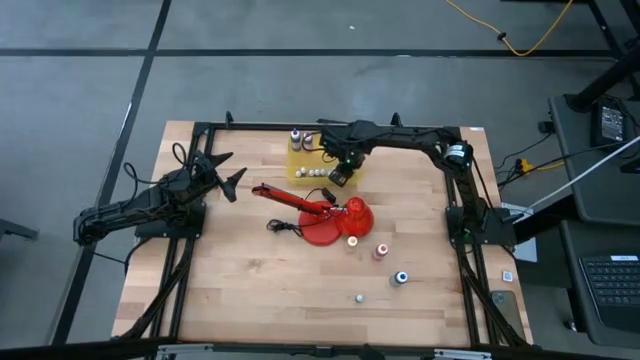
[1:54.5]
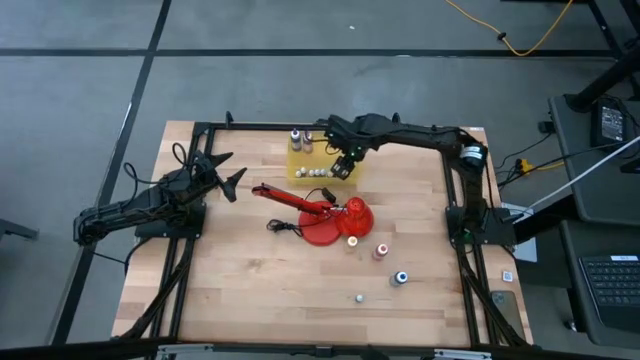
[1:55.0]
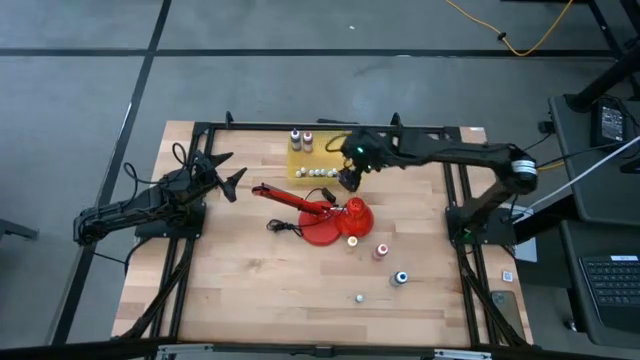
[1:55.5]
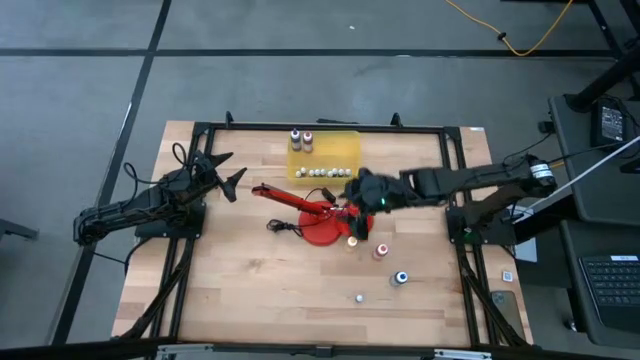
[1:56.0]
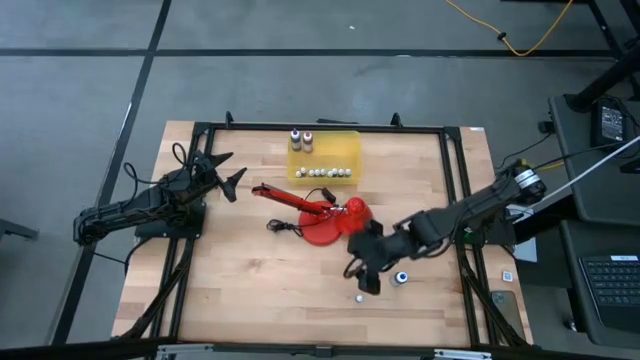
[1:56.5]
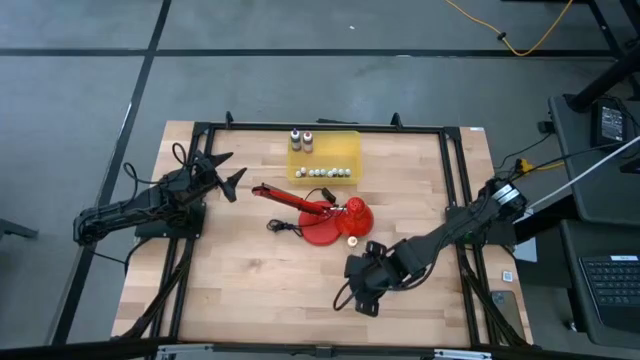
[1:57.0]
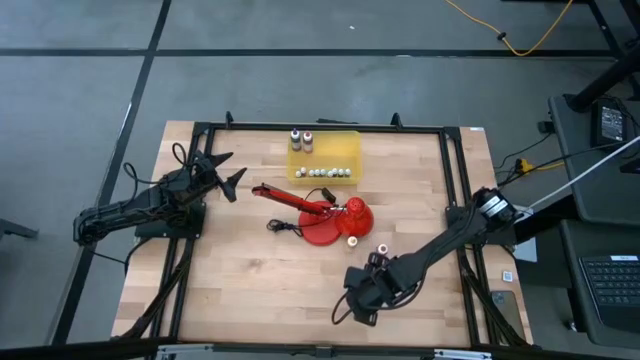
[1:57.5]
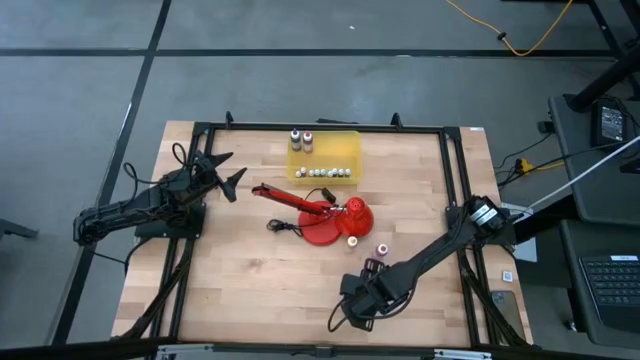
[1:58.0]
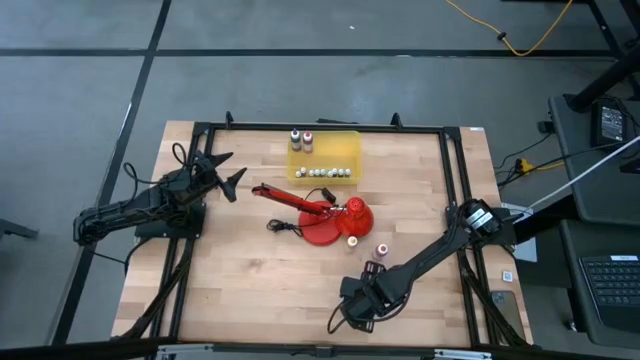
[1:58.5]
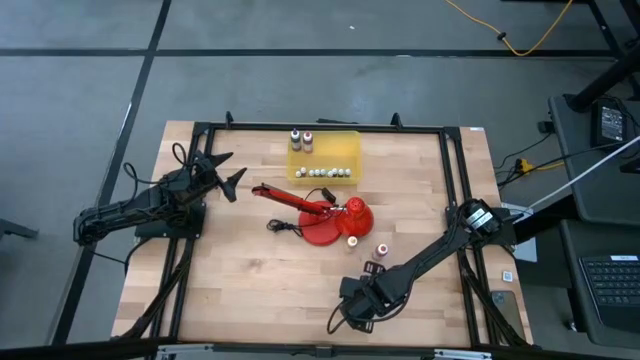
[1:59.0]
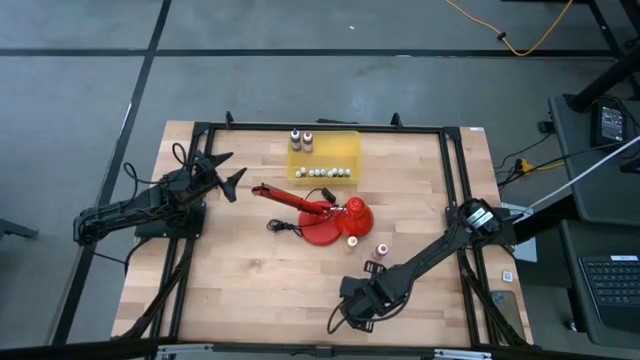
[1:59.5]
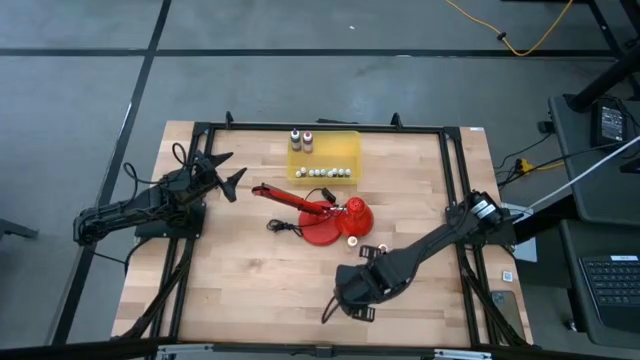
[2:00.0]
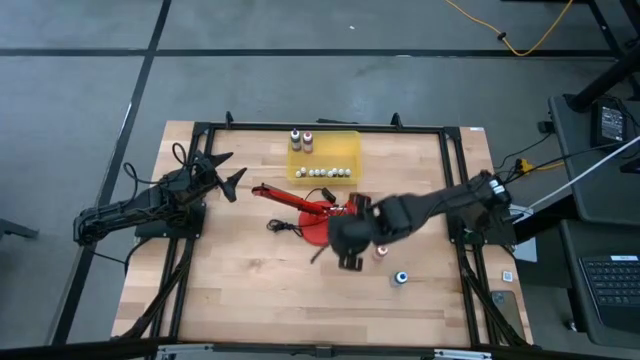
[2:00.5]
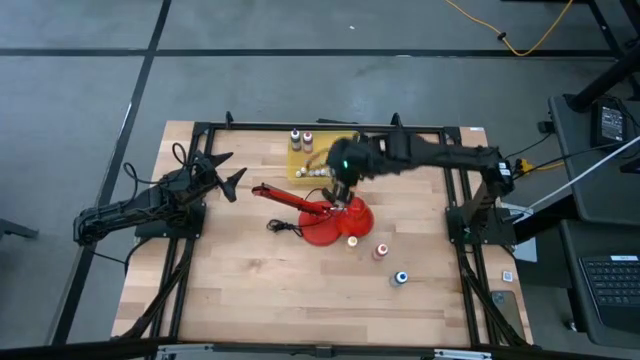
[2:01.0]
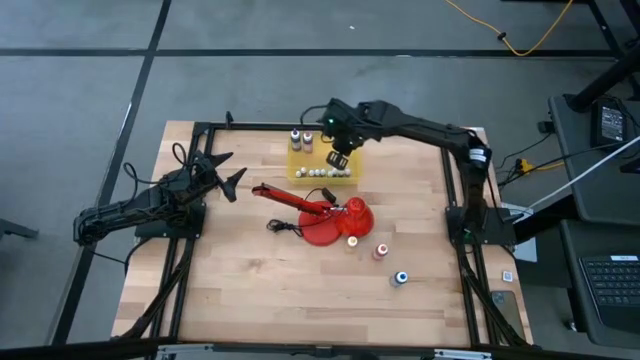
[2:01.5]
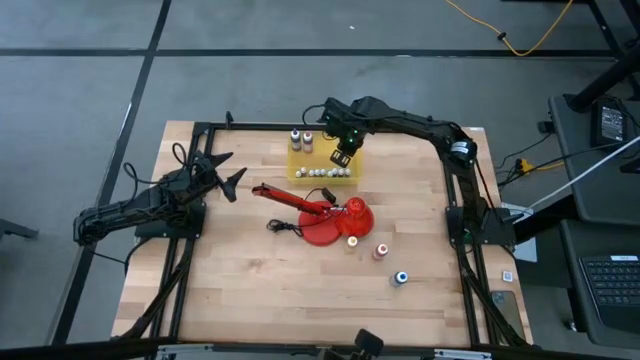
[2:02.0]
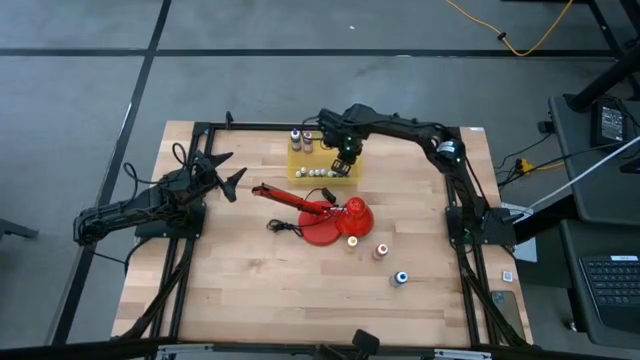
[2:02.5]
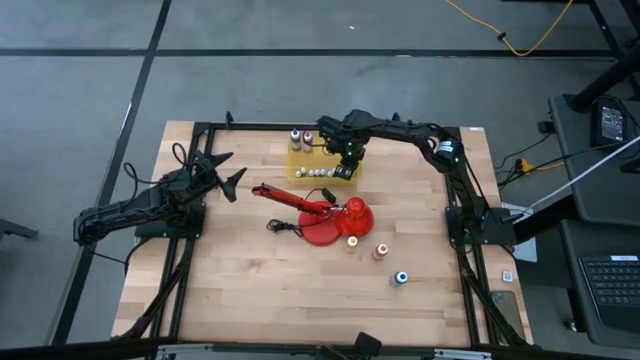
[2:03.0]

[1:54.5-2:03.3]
Task: Pick & Place food coloring
Put the black food coloring bottle into the yellow bin

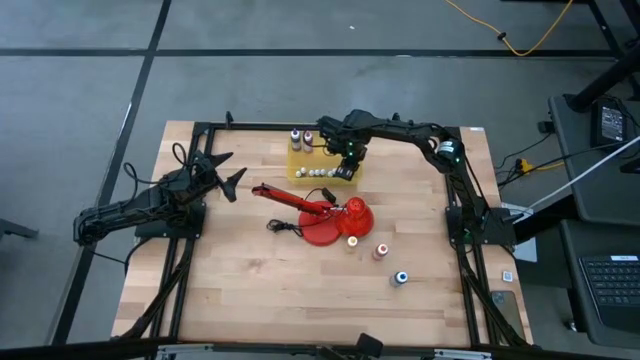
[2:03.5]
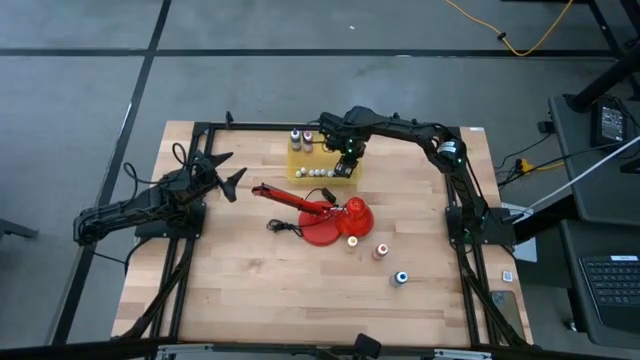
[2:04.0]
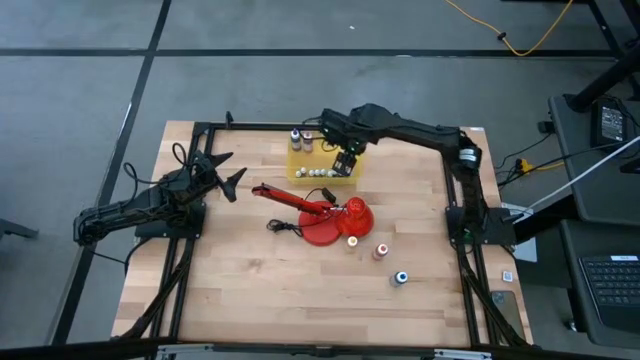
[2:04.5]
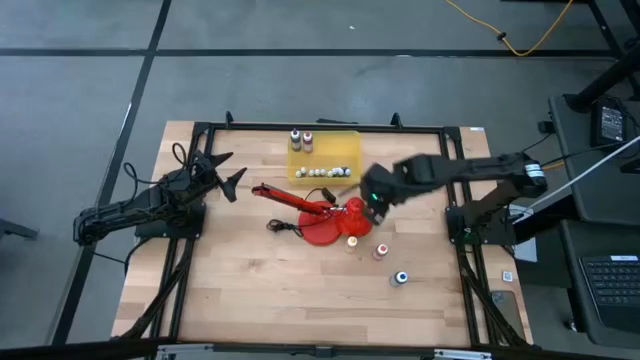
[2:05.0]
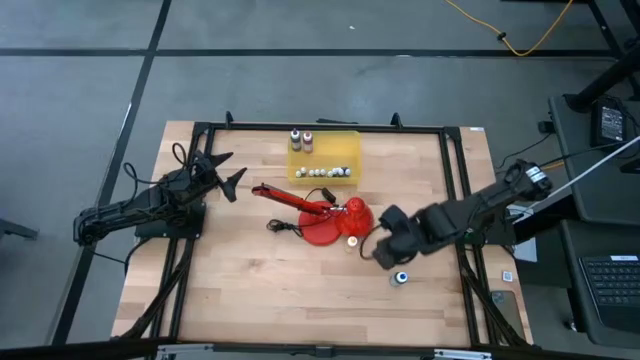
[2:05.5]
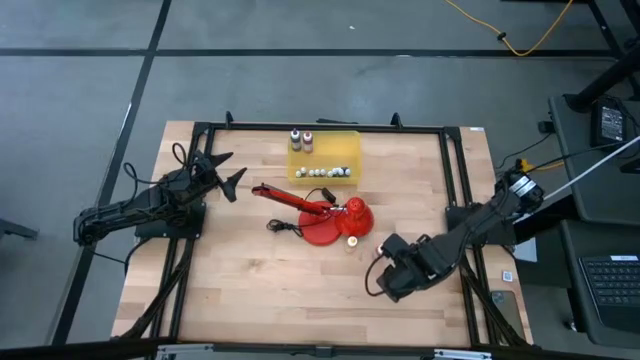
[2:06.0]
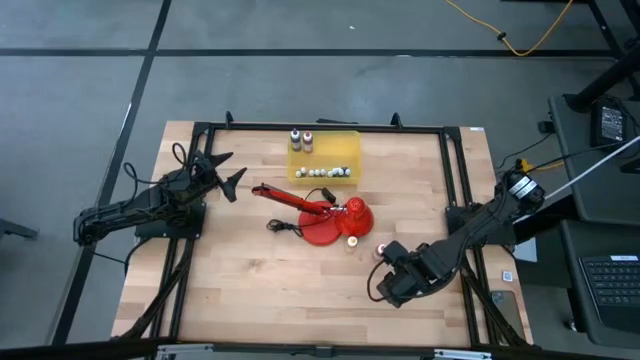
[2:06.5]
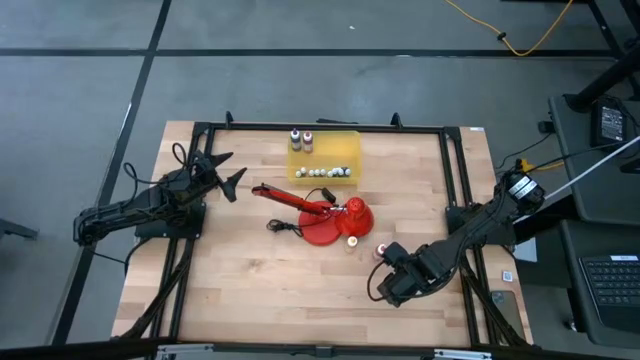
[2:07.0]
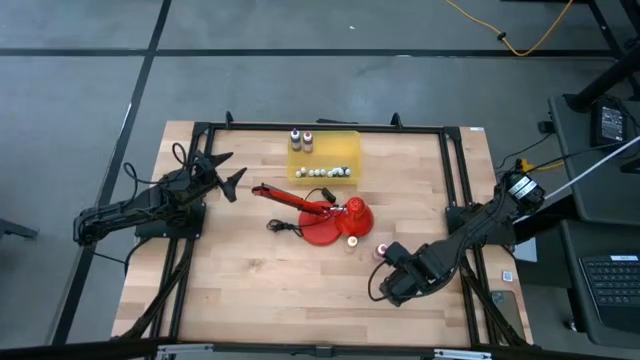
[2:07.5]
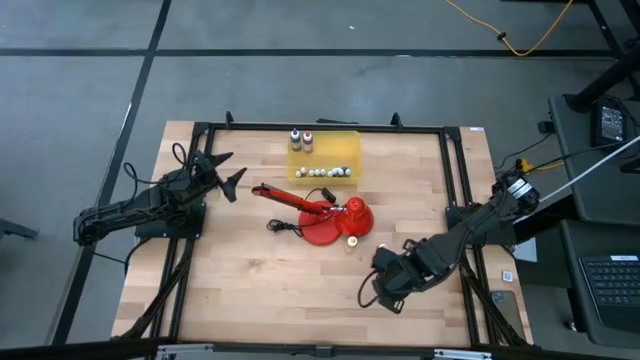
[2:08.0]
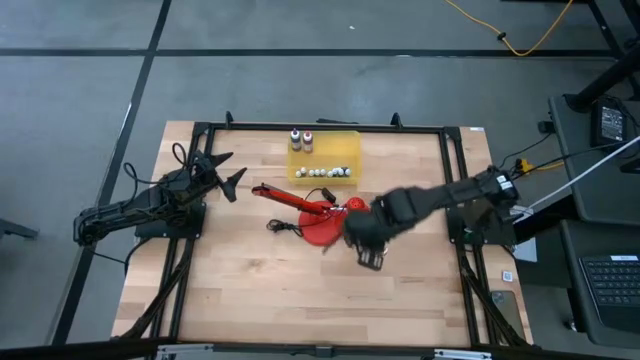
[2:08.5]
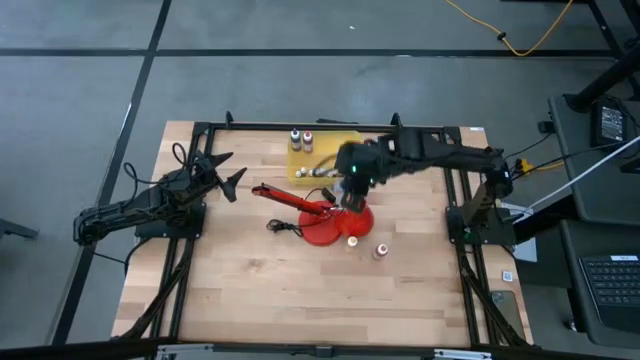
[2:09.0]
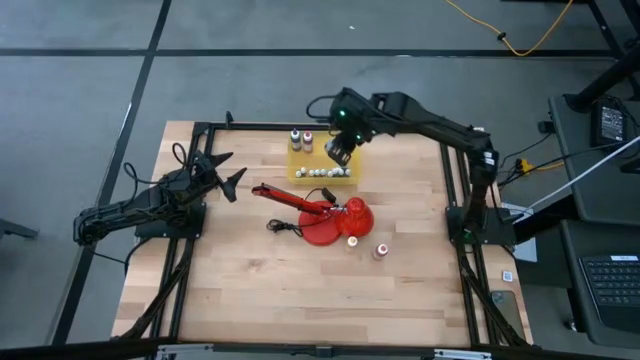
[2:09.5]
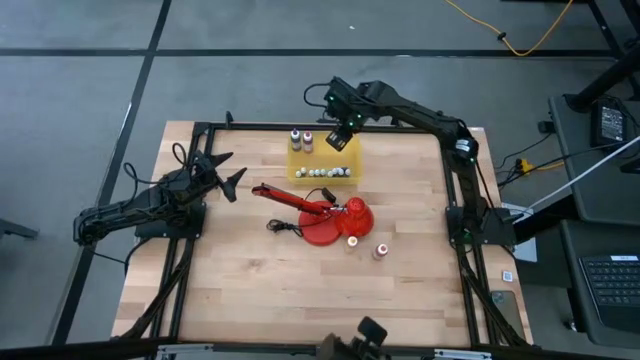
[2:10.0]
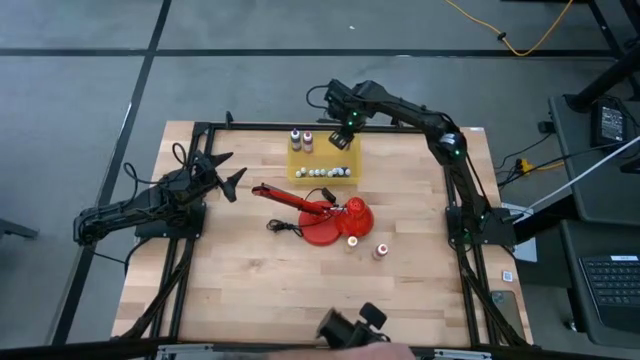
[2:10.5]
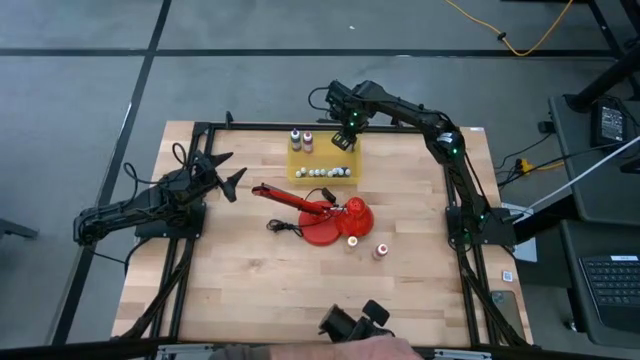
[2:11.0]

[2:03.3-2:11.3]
Put the blue food coloring bottle into the yellow bin

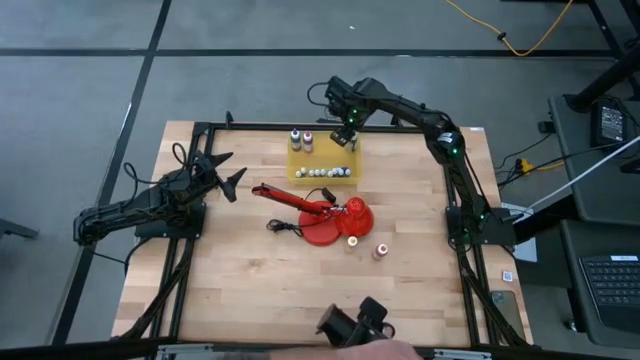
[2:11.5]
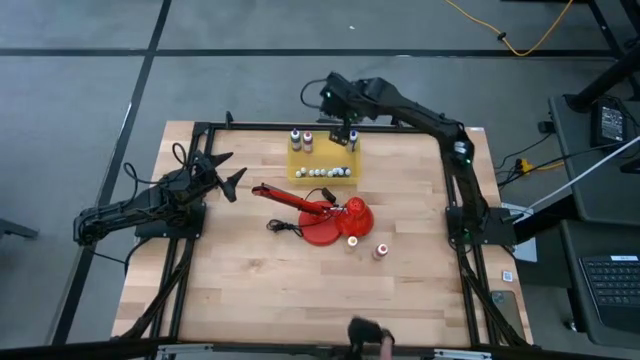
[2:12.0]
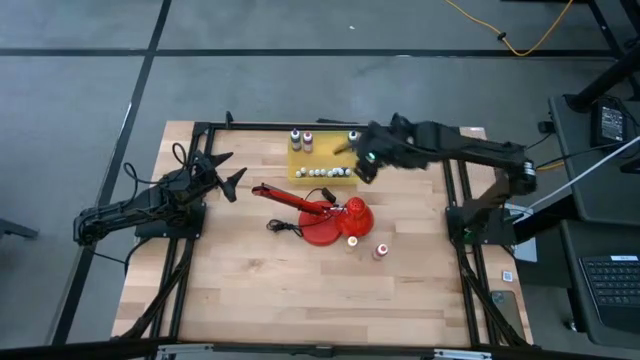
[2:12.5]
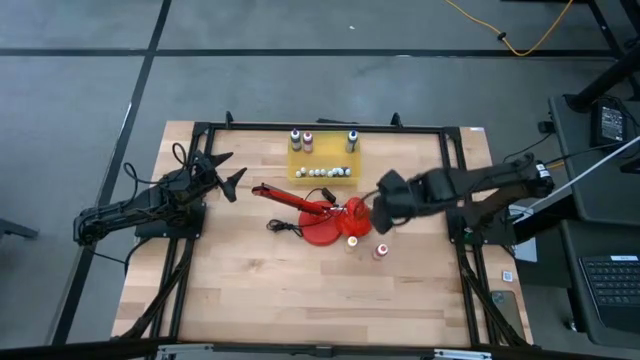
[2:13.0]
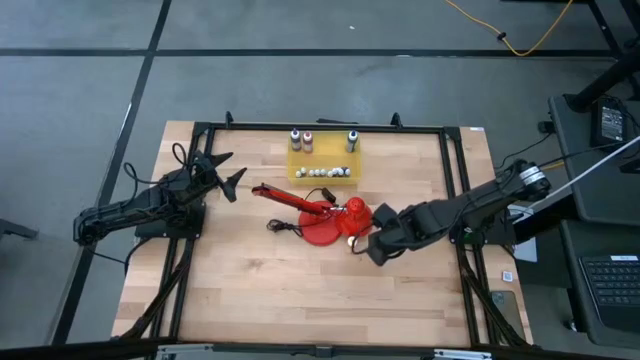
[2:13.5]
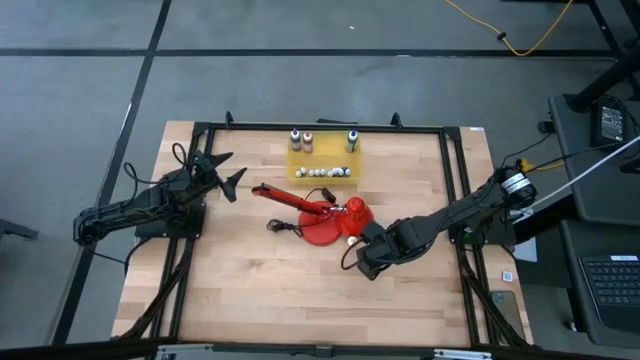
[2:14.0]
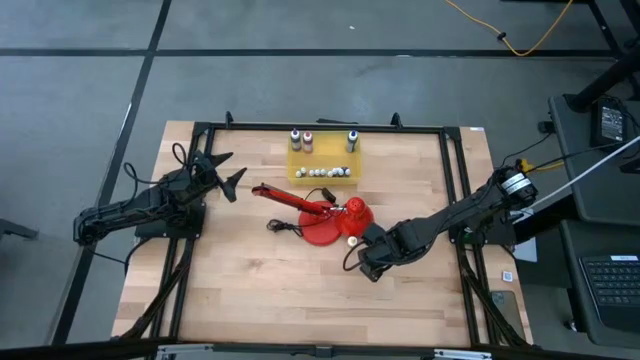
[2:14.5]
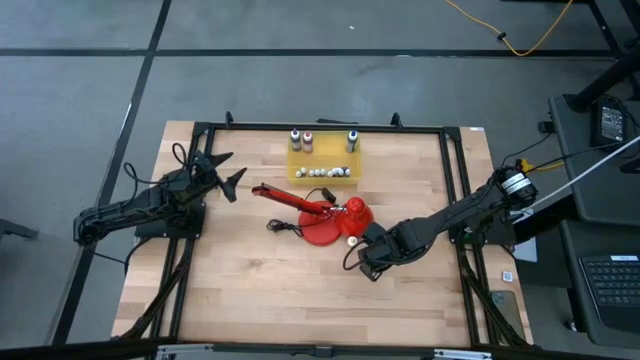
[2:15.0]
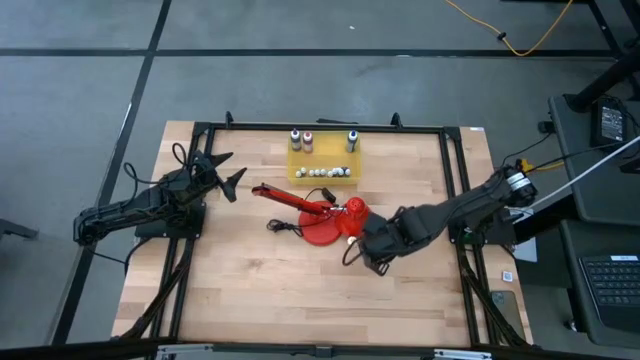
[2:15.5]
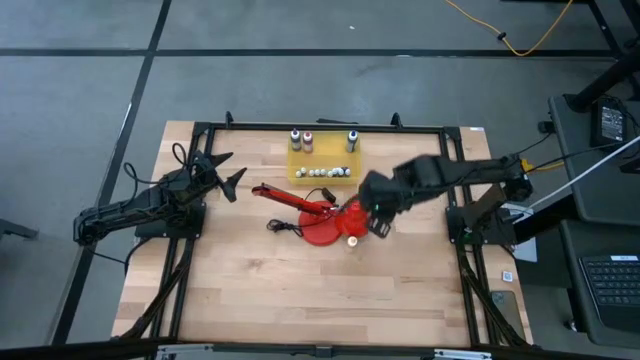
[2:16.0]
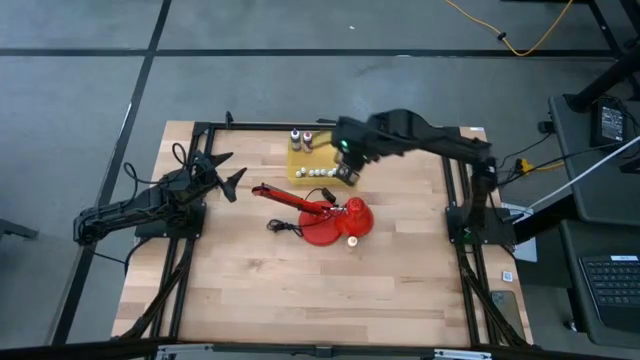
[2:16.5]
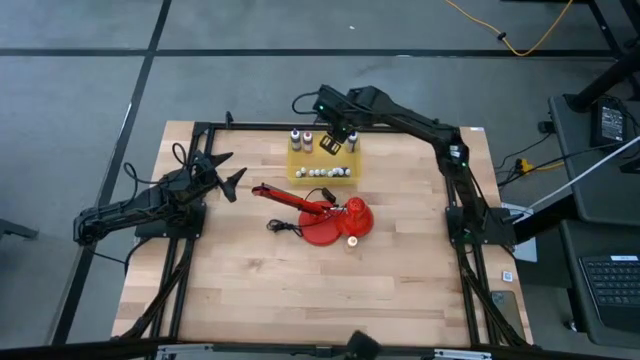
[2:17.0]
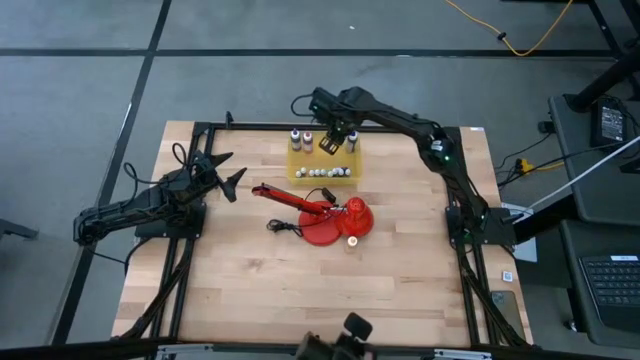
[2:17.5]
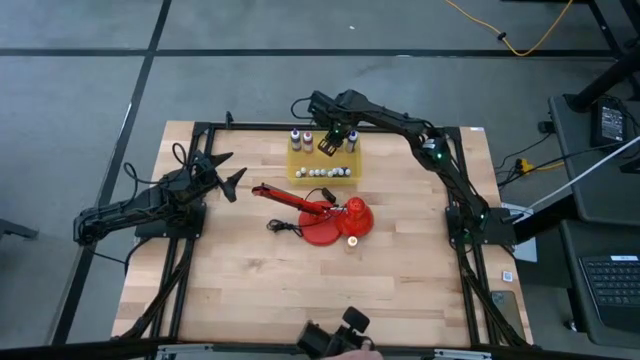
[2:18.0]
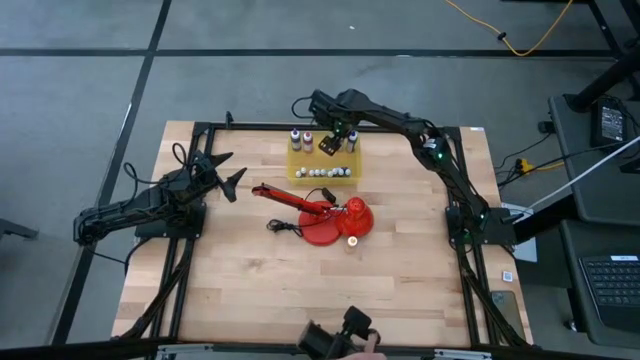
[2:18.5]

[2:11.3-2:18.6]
Put the orange food coloring bottle into the yellow bin
